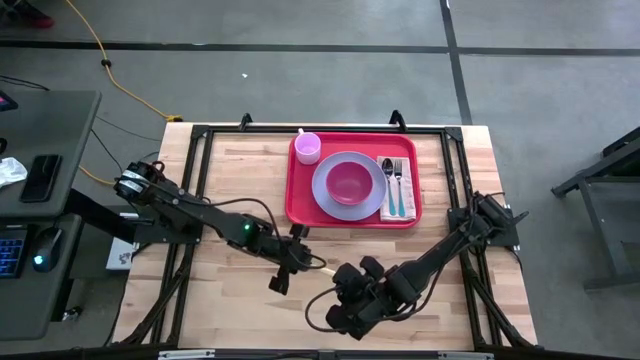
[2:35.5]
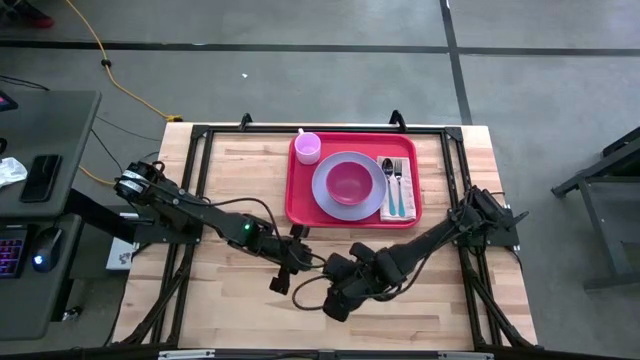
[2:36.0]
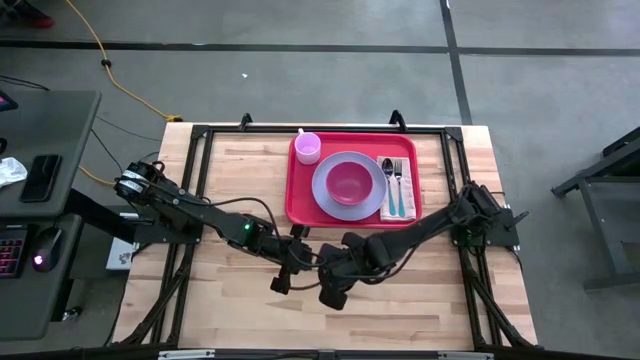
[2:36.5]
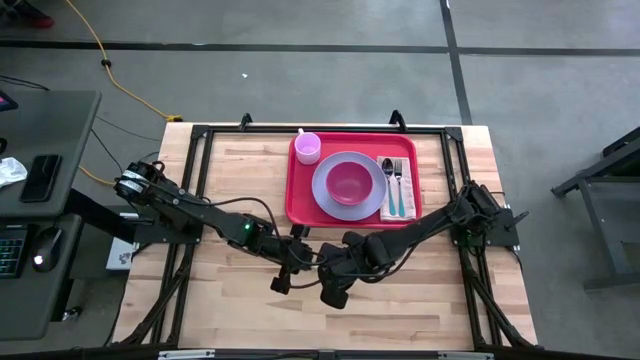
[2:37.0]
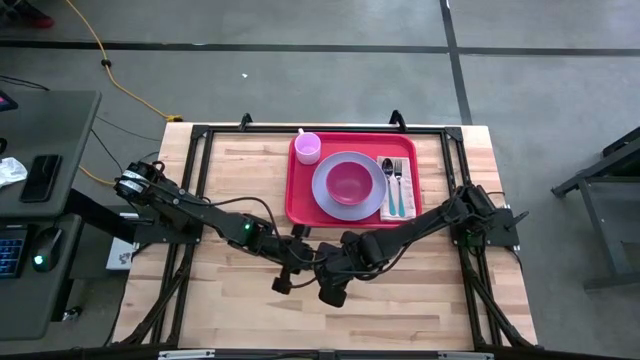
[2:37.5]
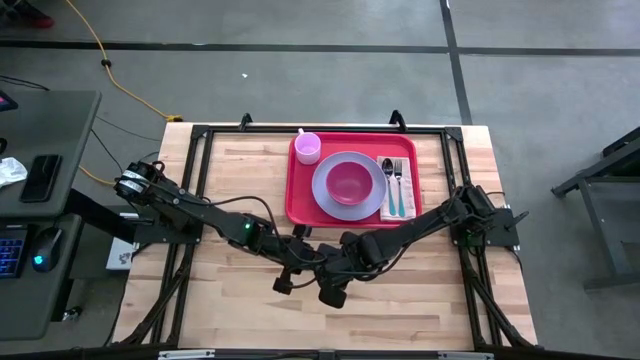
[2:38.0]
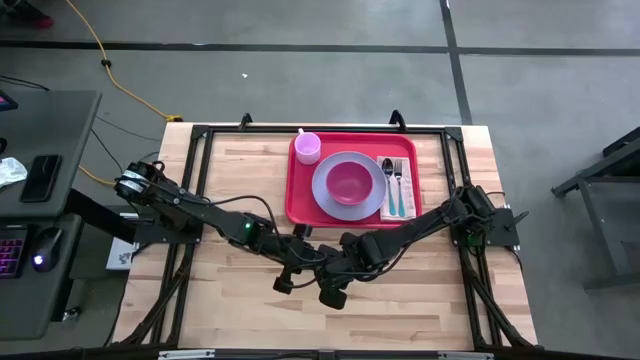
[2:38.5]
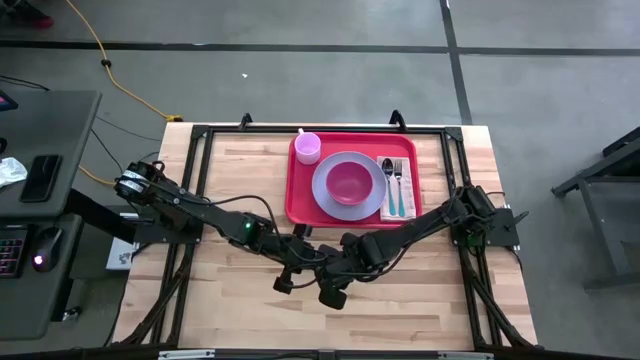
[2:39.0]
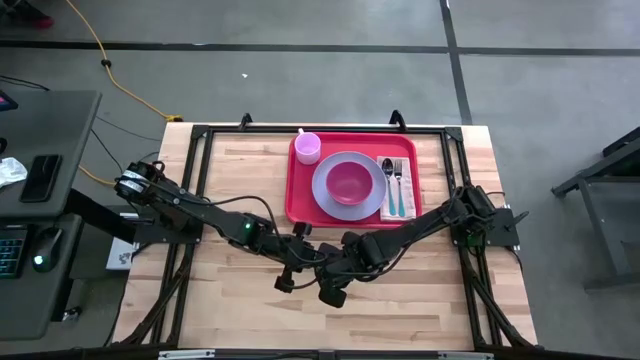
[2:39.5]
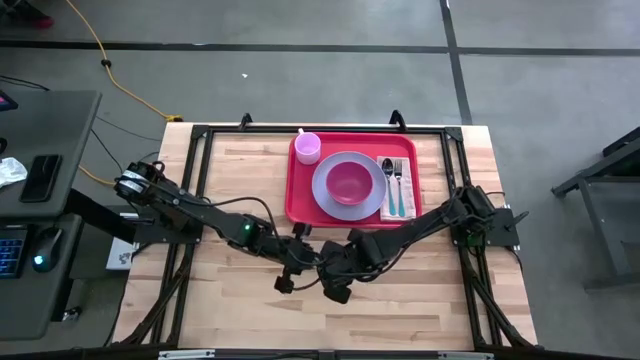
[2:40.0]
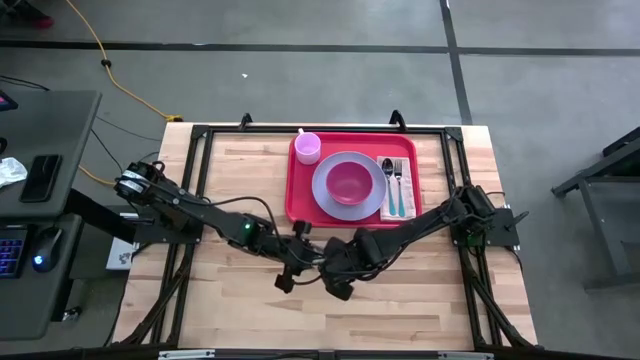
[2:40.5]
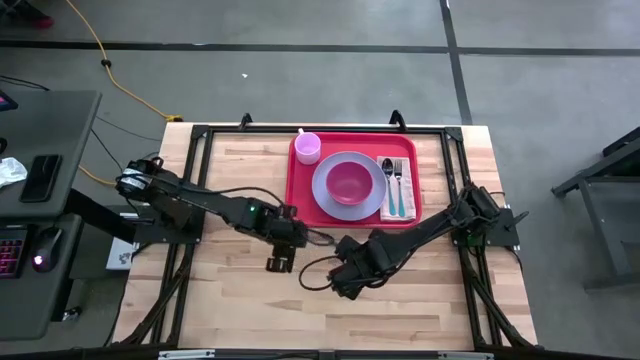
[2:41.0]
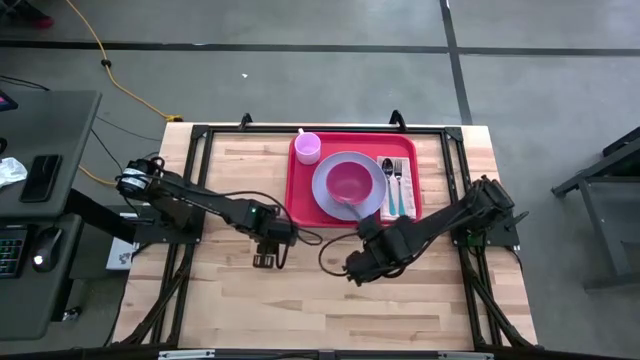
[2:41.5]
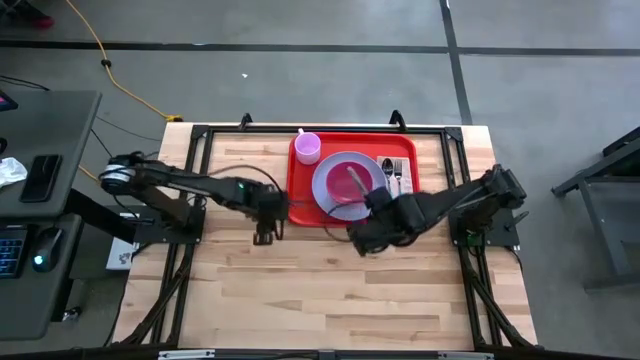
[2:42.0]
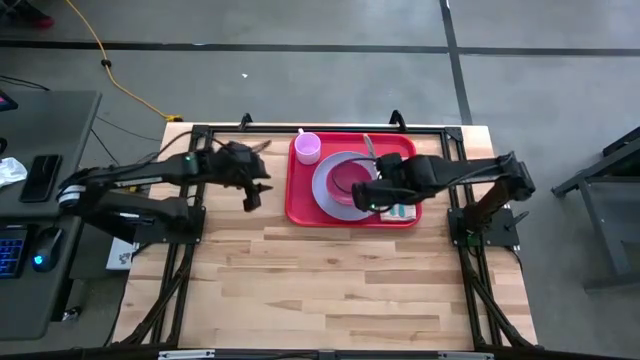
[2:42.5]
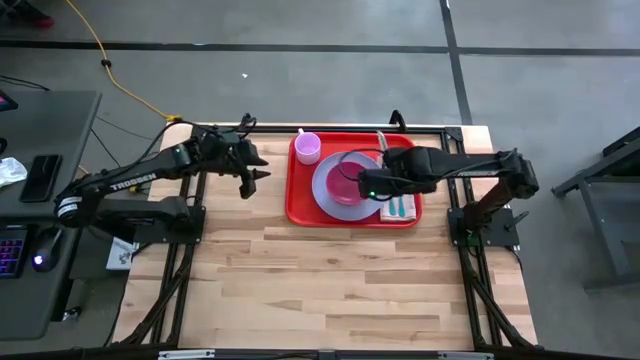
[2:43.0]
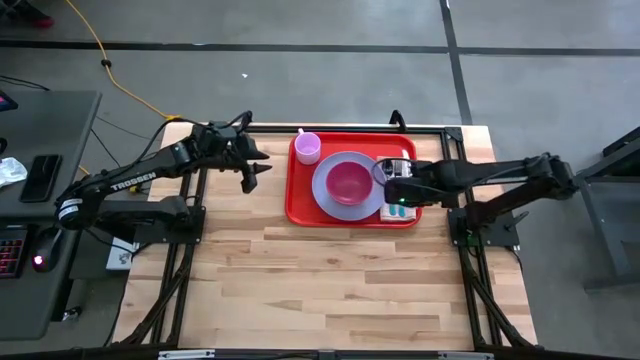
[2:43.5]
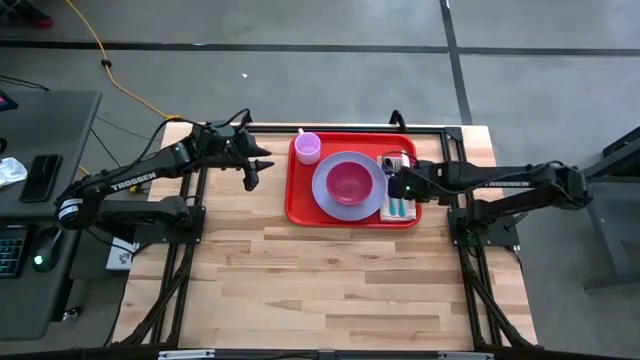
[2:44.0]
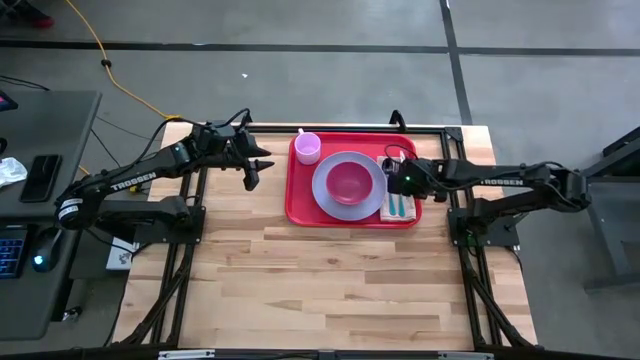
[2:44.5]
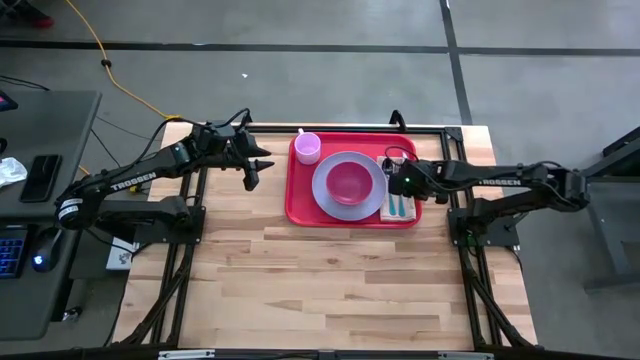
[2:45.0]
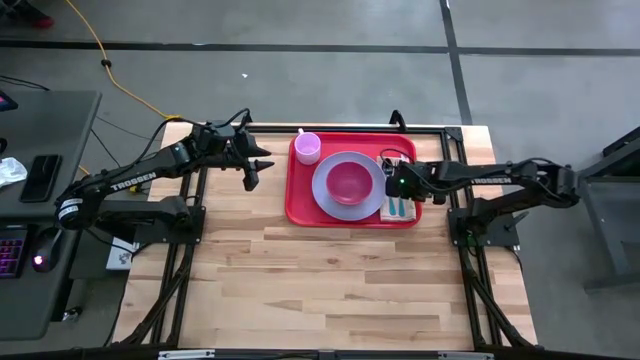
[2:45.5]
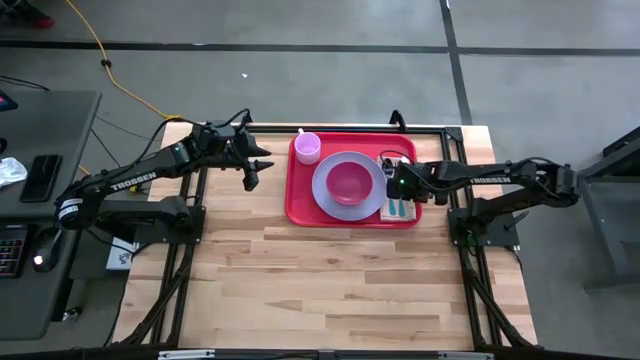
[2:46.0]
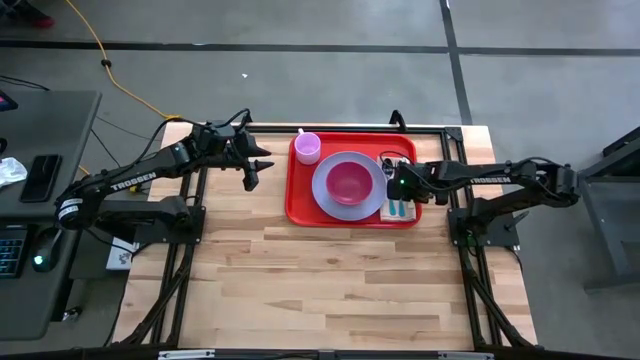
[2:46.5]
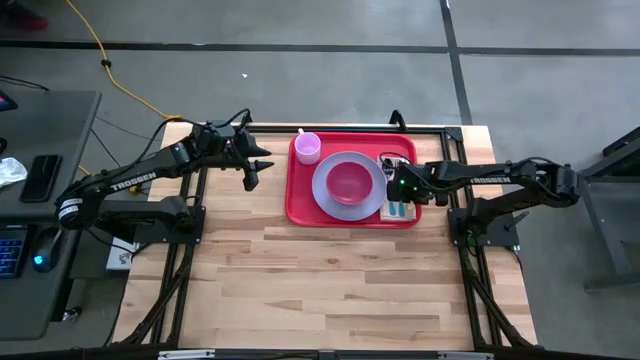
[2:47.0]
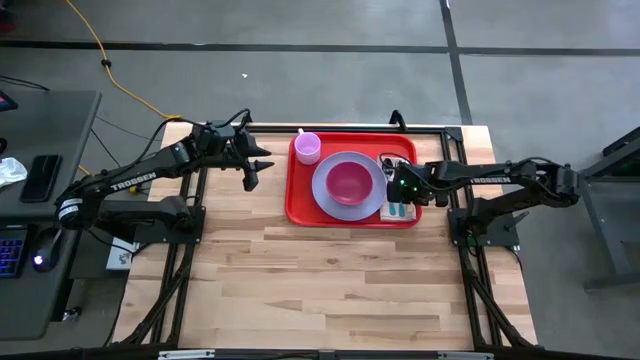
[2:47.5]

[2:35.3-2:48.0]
Task: Set up tray
Put the yellow knife on top of the napkin to the right of the blue fork in the red tray

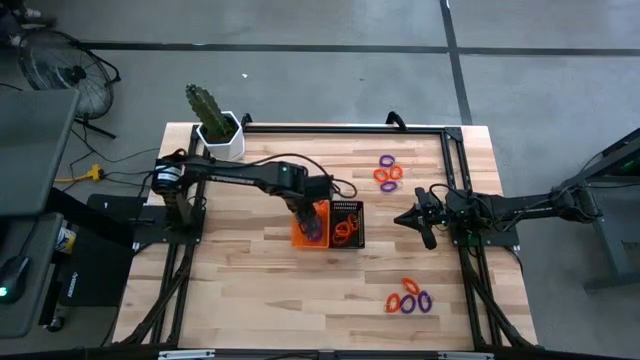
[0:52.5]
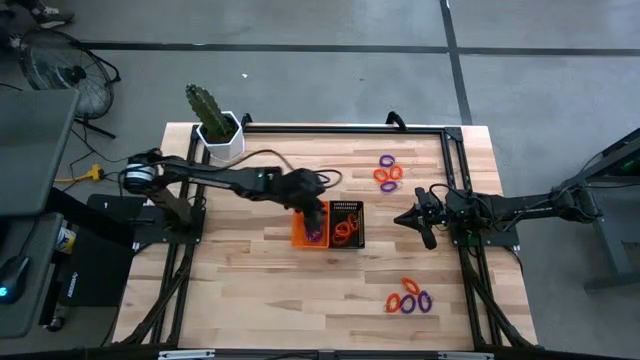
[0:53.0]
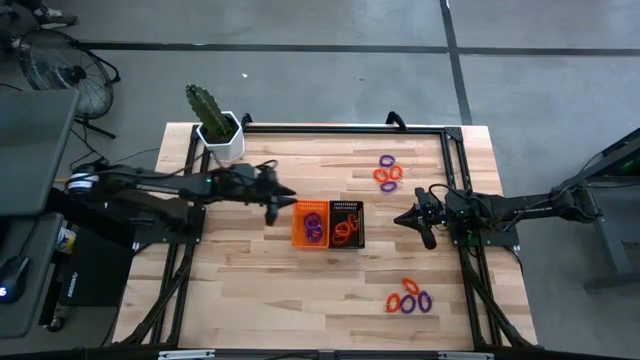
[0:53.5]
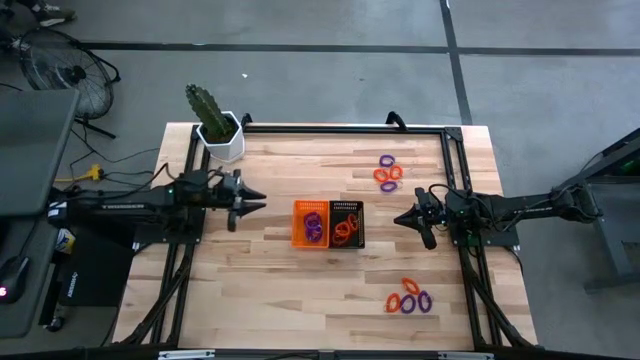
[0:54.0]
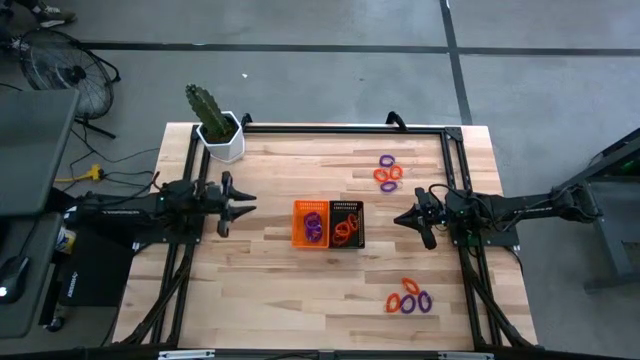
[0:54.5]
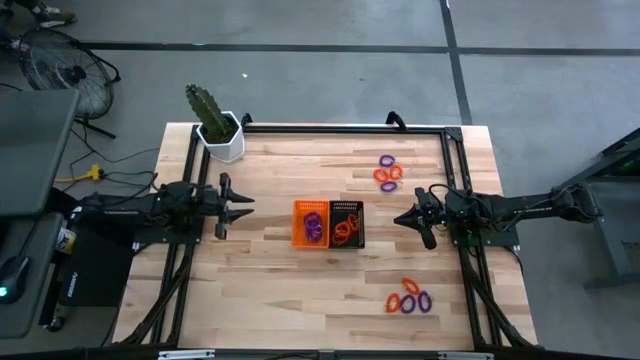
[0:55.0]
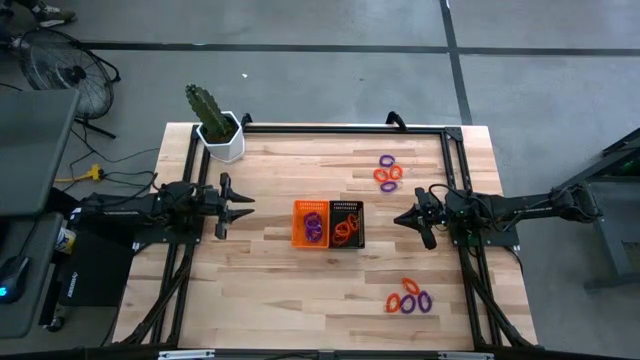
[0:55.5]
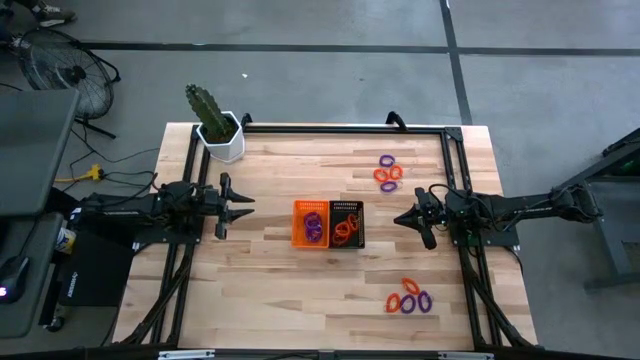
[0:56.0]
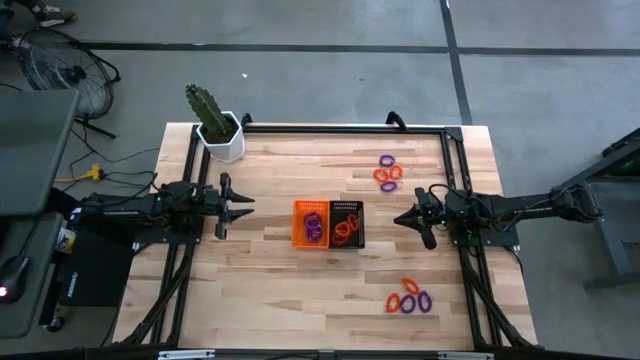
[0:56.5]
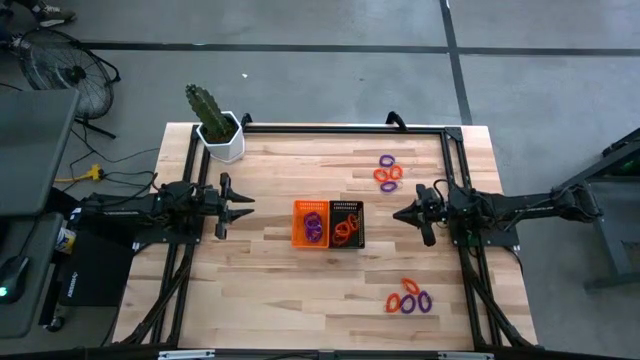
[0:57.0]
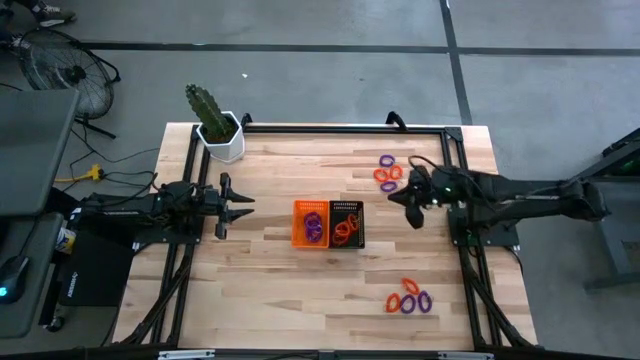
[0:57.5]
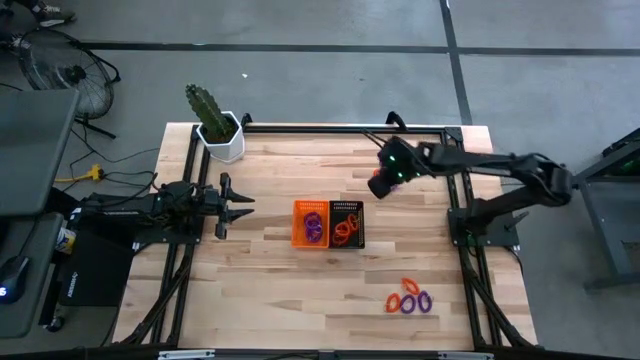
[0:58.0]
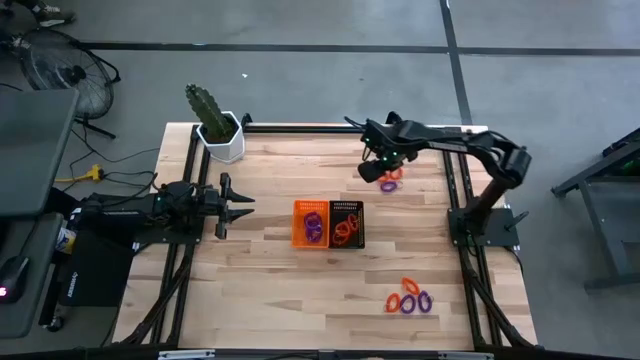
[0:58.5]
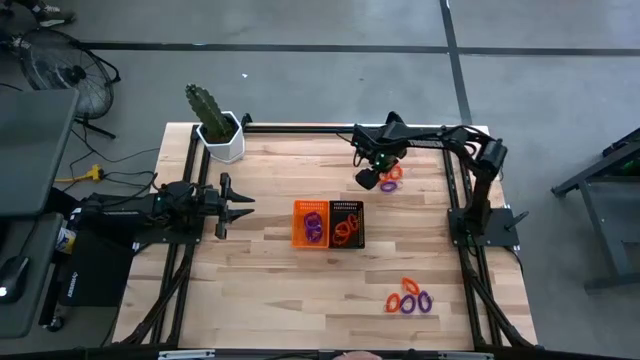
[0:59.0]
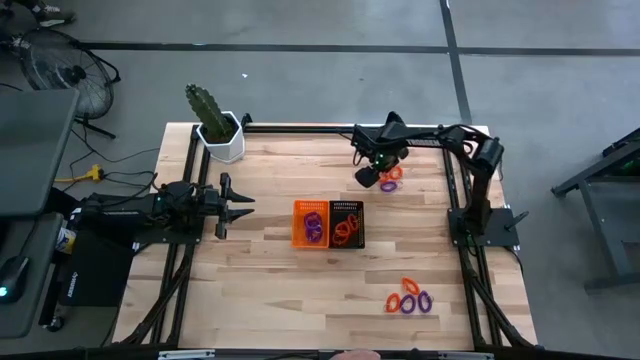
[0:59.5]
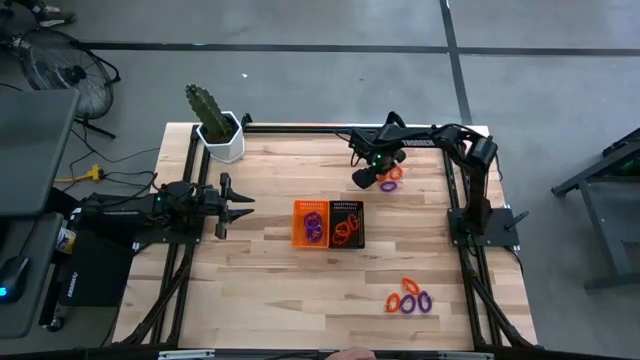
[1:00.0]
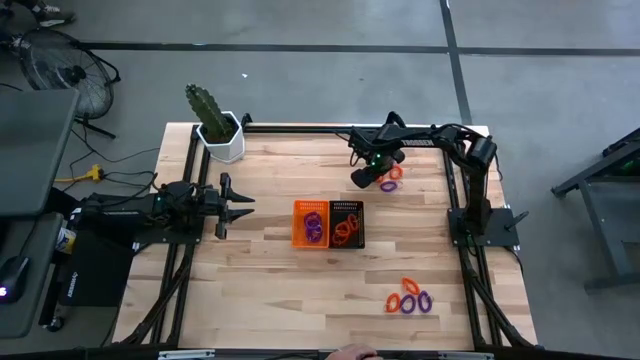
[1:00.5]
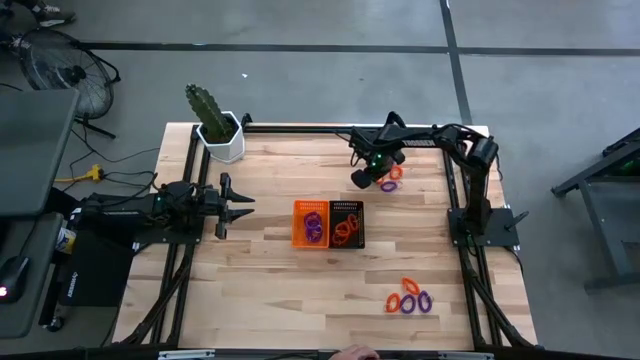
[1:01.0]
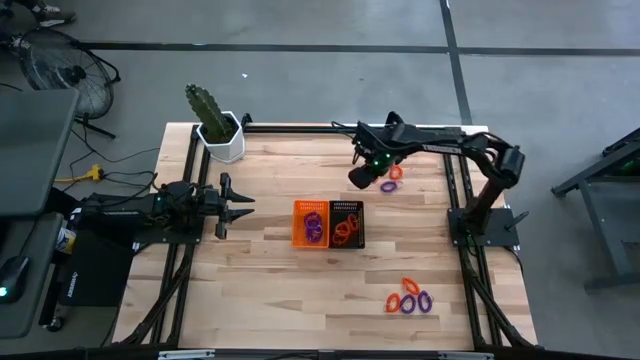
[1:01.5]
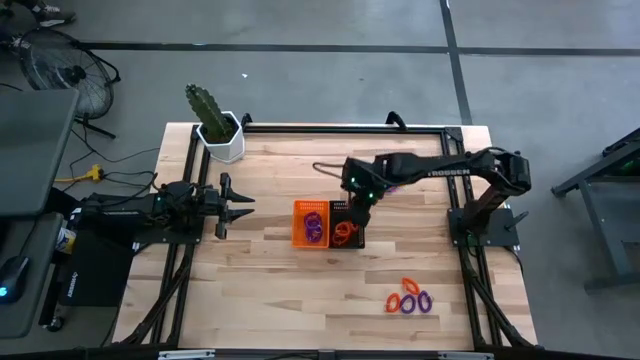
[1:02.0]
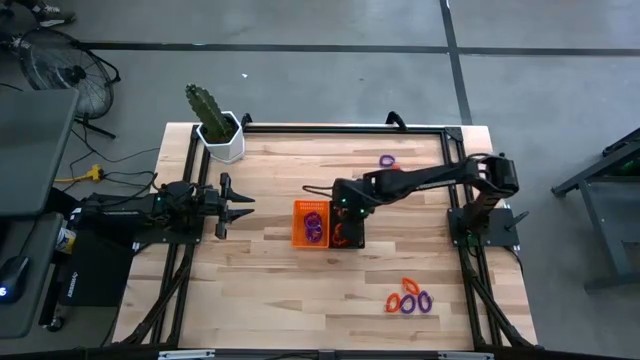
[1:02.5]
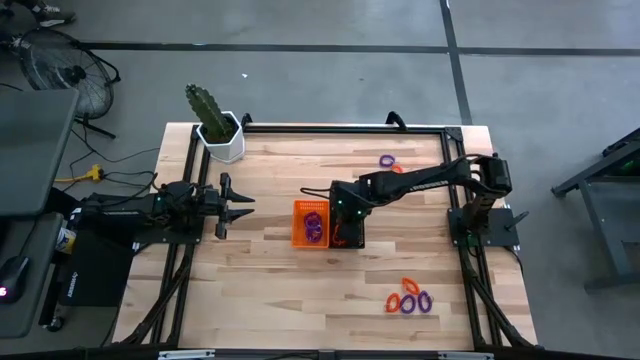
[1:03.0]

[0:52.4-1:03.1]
Task: Sort spring keychains
Put the orange spring keychain into the black bin
